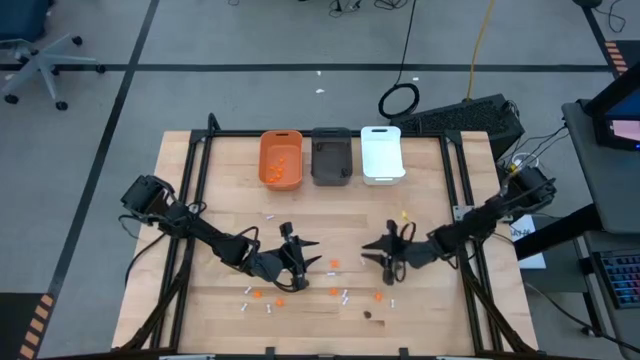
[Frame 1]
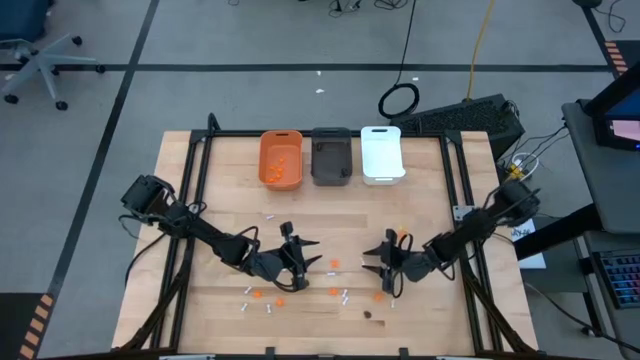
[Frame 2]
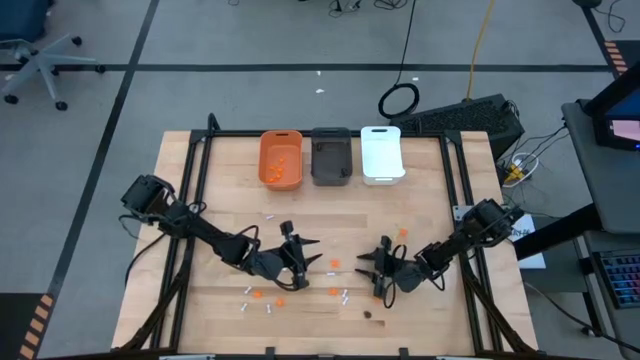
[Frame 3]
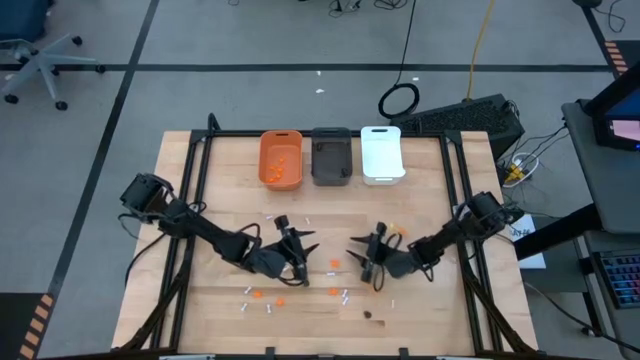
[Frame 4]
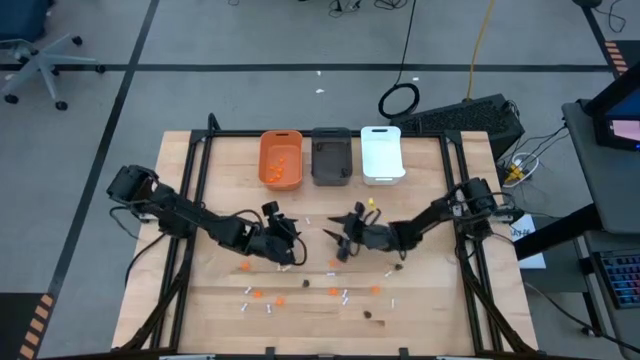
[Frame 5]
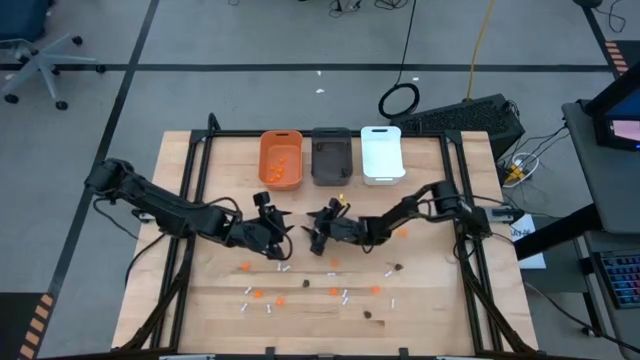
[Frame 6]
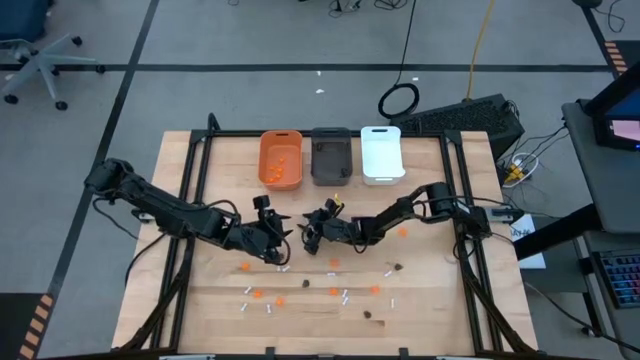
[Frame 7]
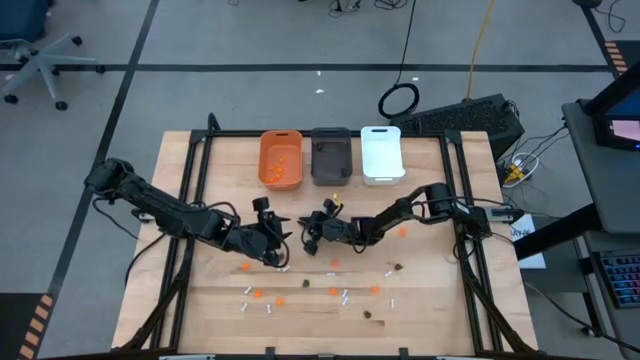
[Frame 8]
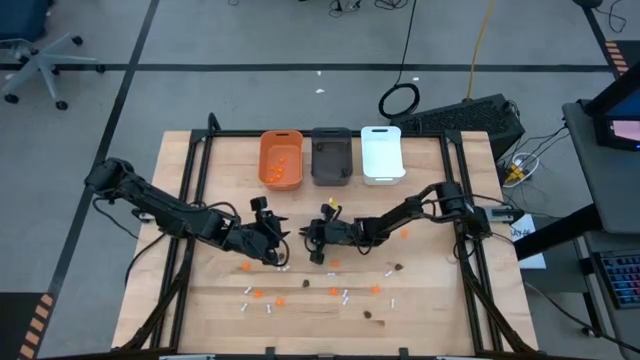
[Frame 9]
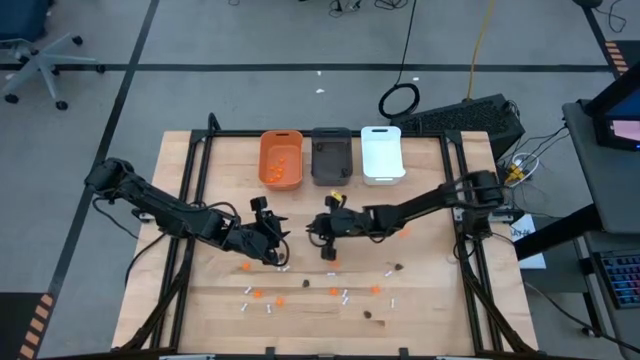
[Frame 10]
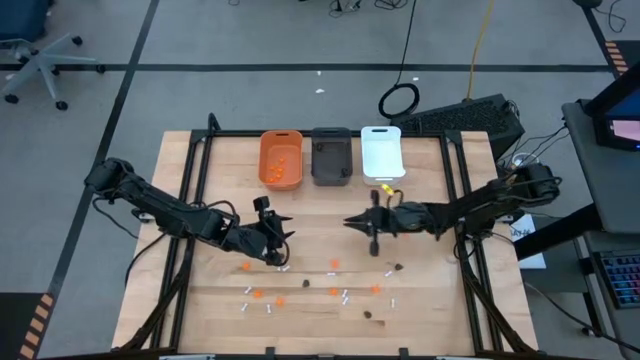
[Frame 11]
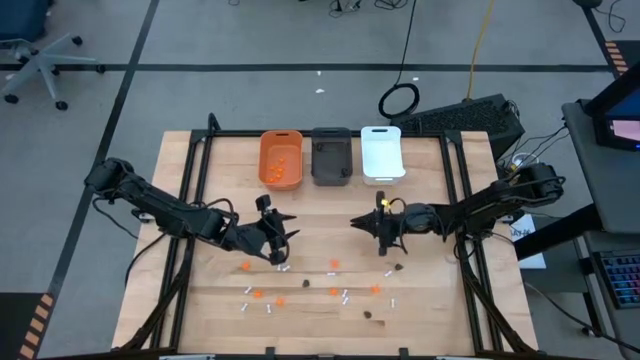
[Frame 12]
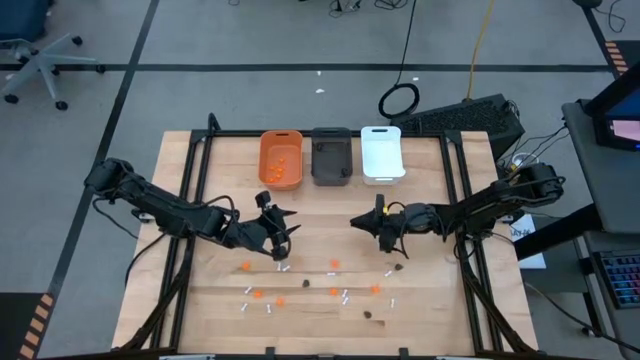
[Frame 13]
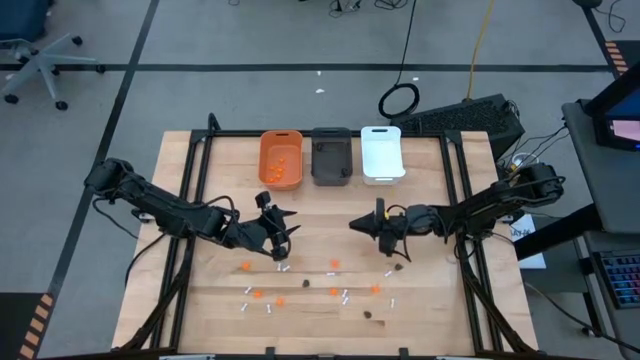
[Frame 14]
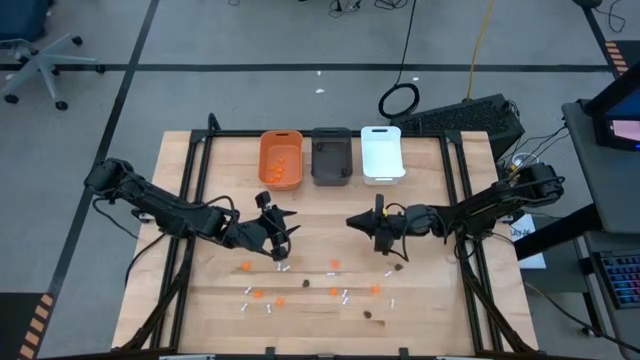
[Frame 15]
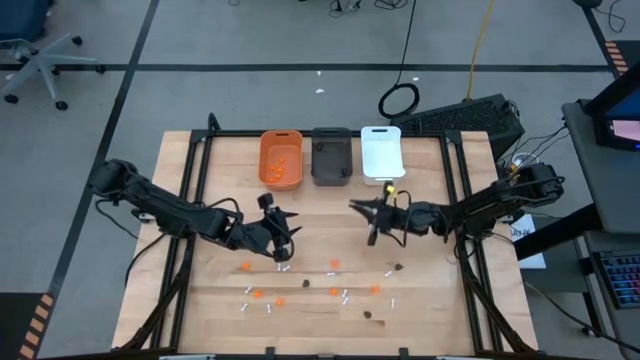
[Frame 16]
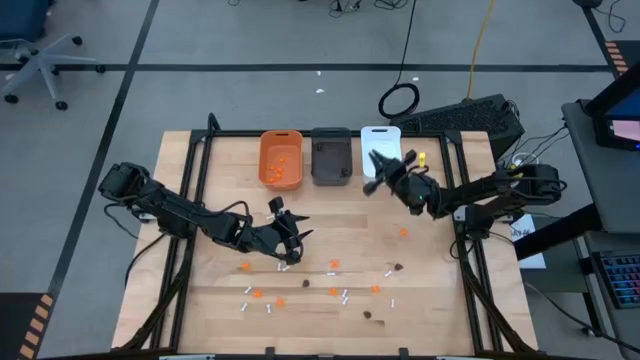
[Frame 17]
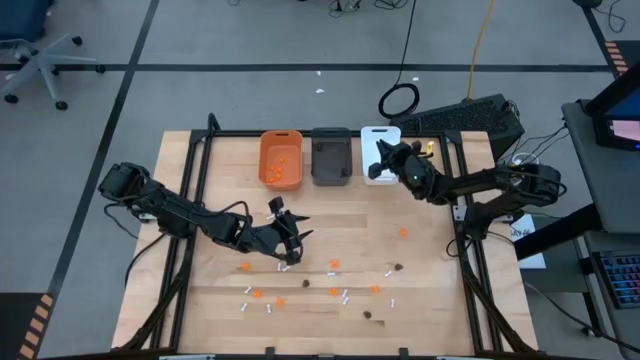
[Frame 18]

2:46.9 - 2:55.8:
Task: Sort Halloween decoration
Put the white bone toy into the white bin

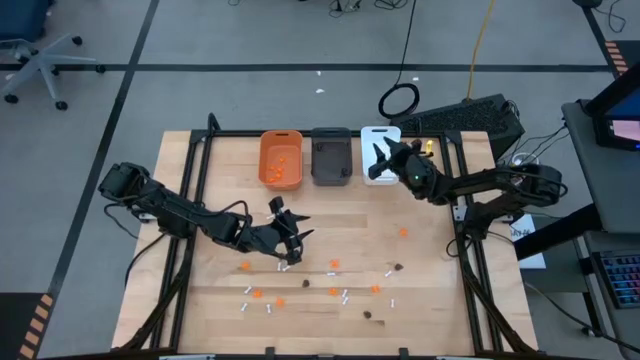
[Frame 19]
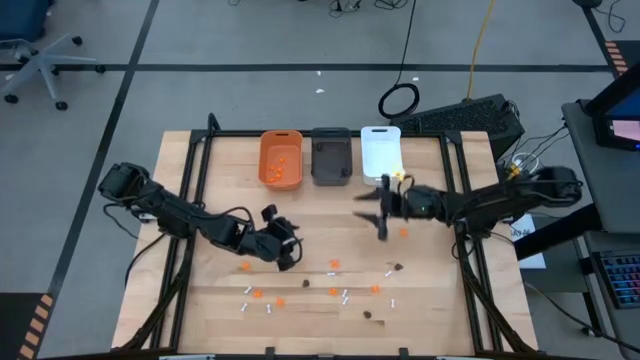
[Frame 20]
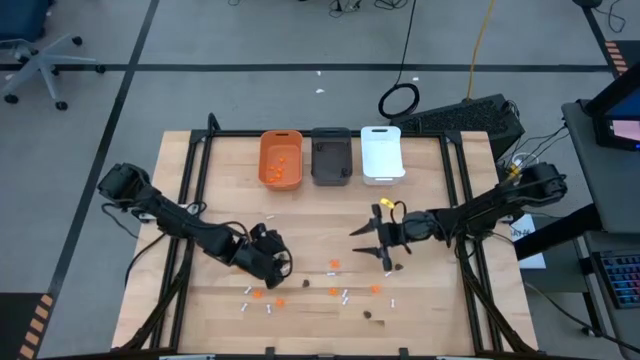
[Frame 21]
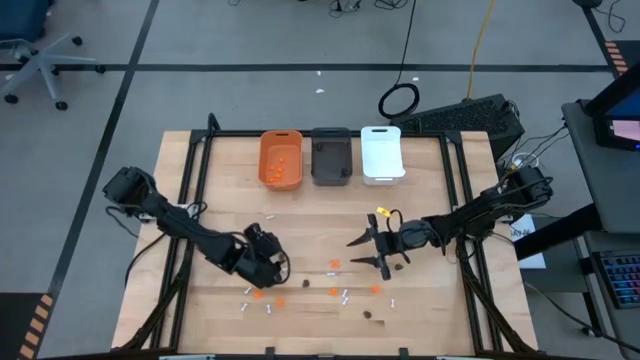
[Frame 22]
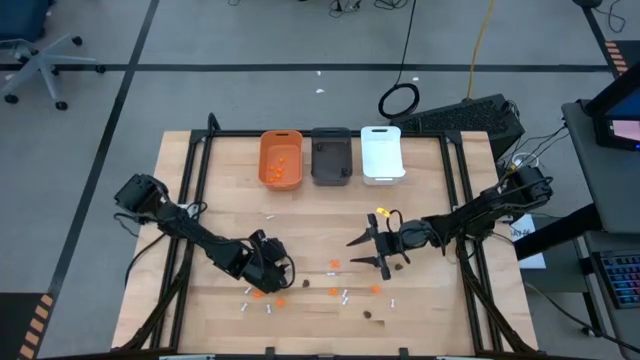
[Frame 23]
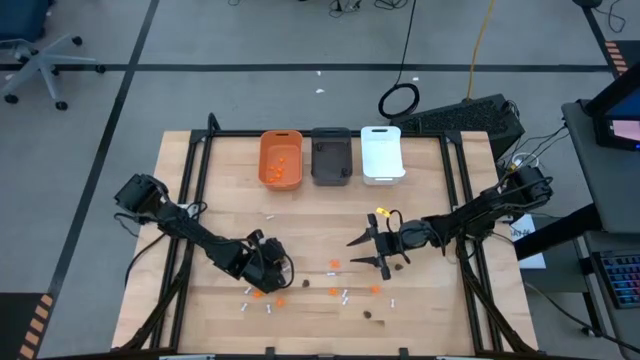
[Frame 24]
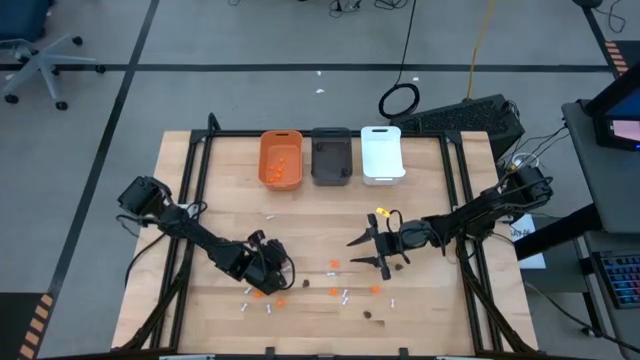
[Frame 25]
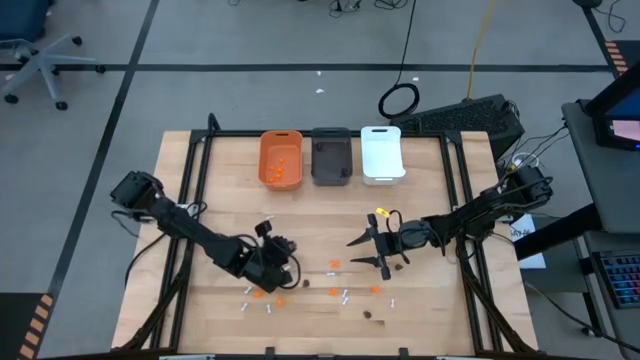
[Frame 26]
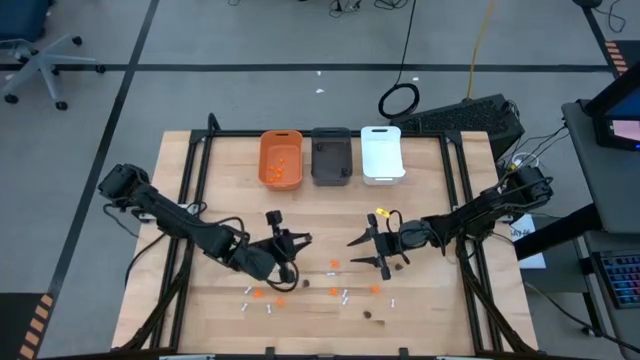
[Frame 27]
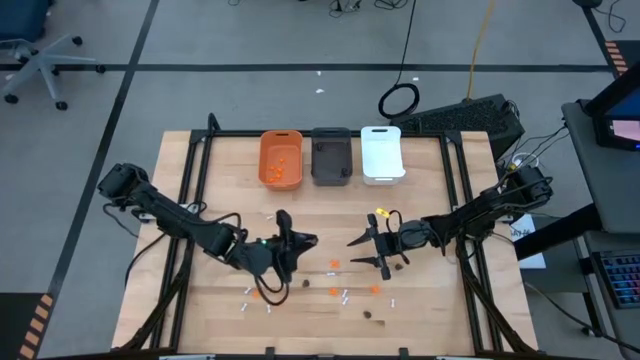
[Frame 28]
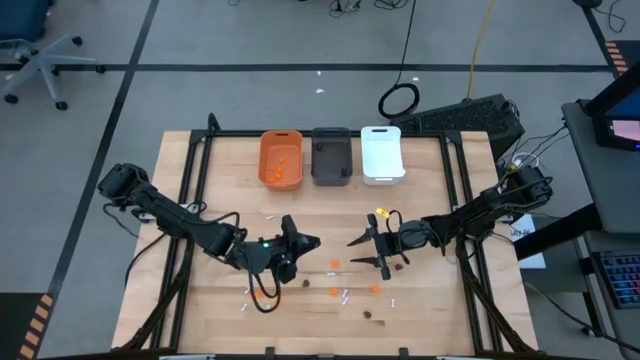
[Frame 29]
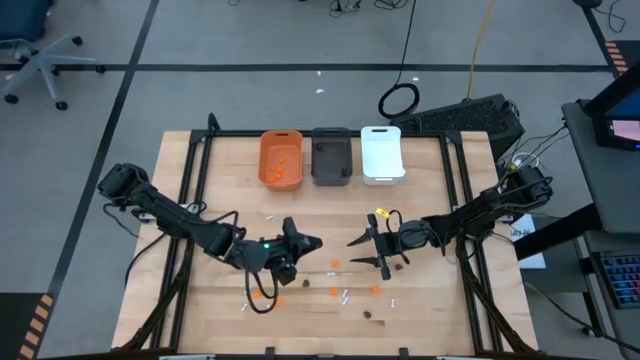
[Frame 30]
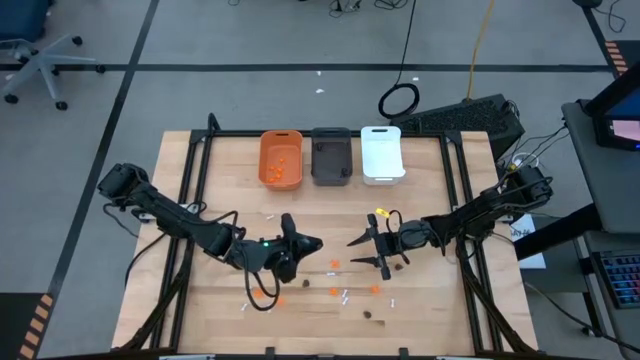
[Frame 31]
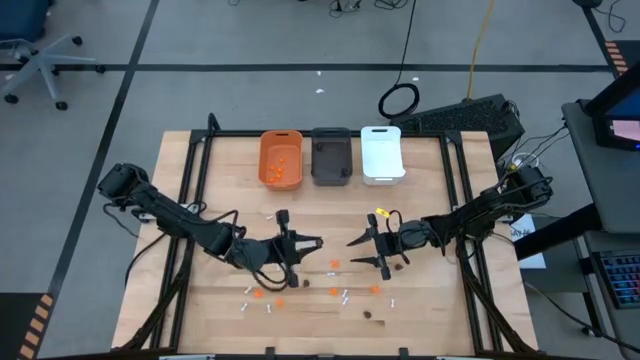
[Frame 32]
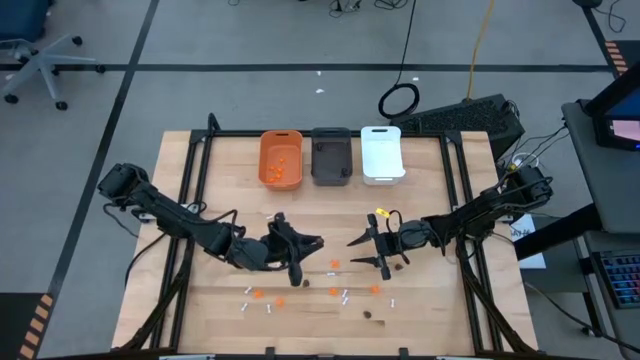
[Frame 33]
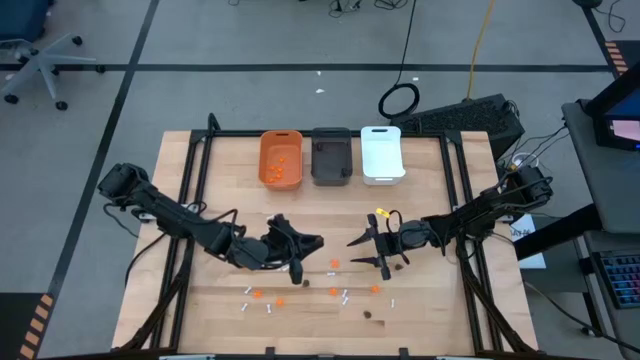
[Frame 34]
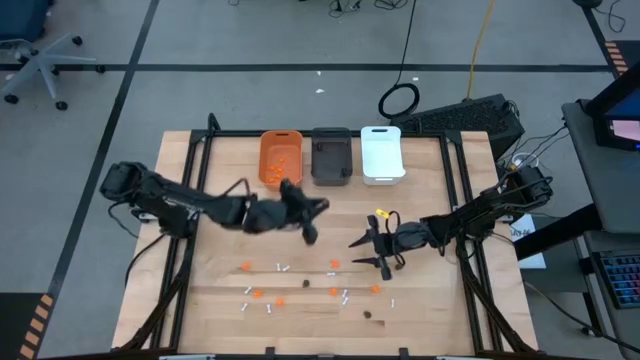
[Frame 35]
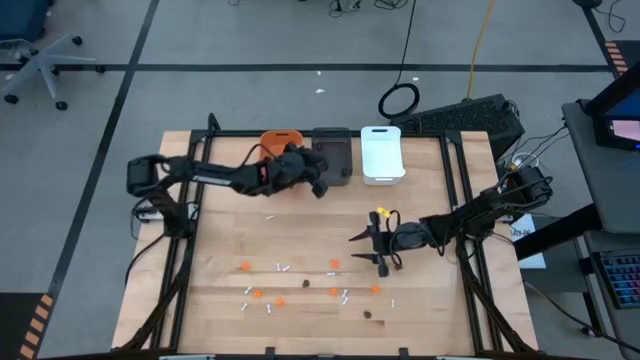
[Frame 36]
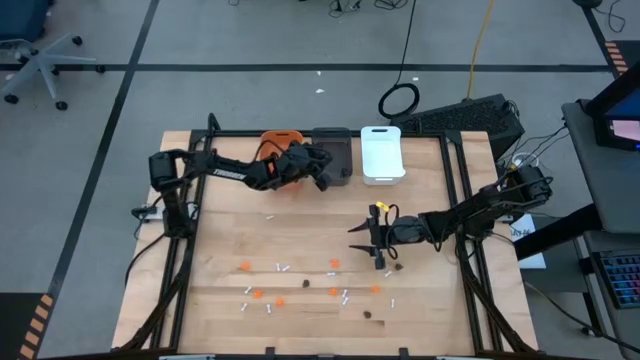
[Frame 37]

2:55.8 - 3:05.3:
Put the black skull toy into the black bin
